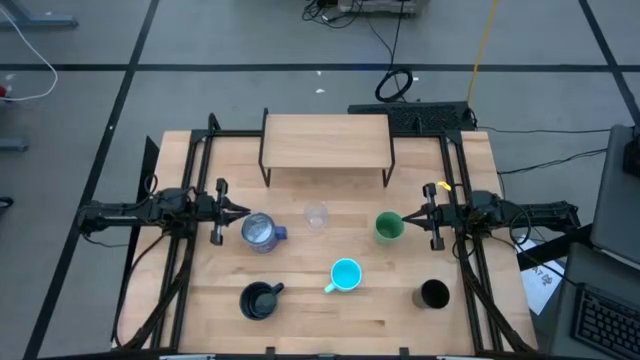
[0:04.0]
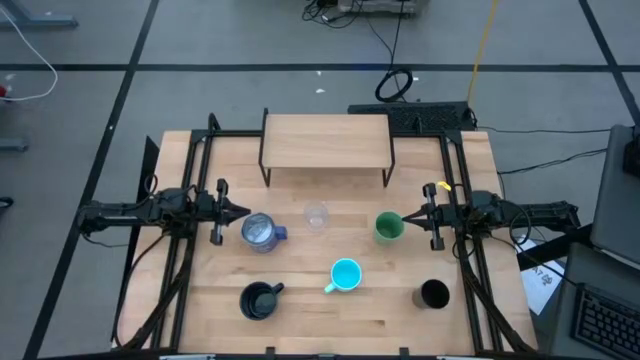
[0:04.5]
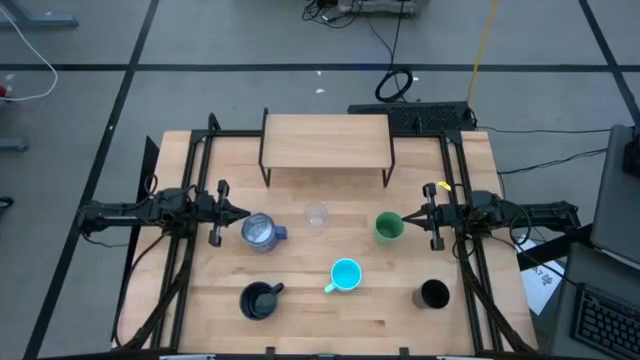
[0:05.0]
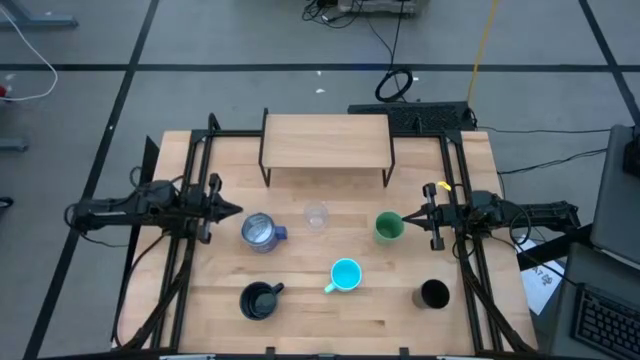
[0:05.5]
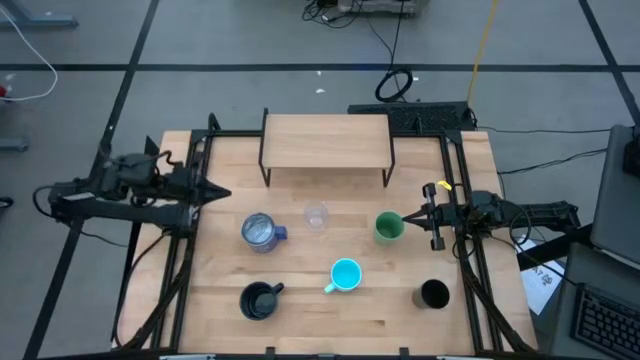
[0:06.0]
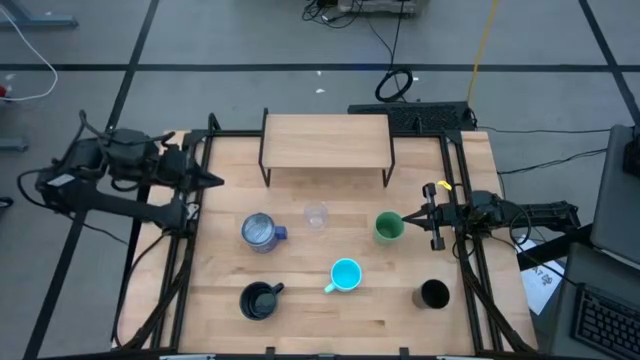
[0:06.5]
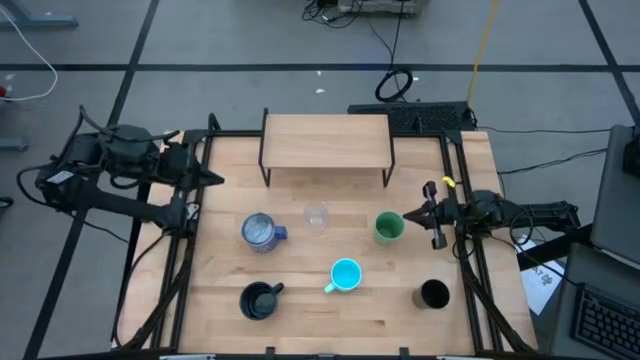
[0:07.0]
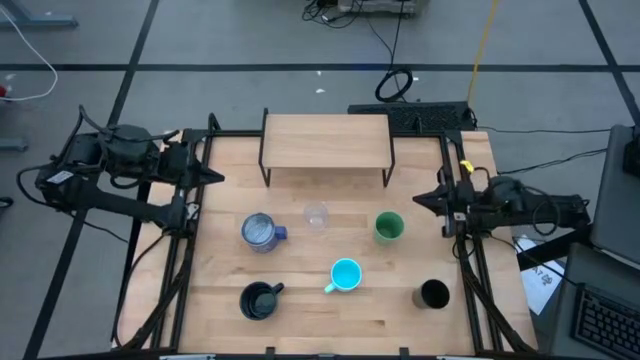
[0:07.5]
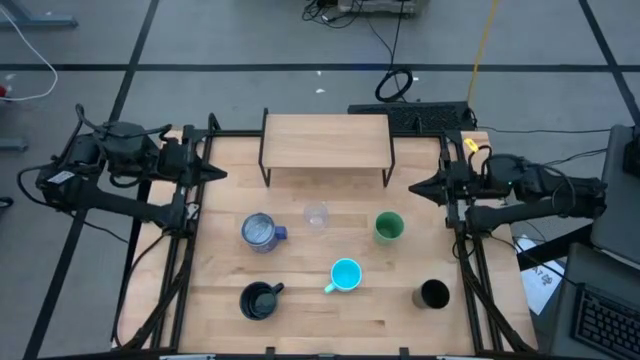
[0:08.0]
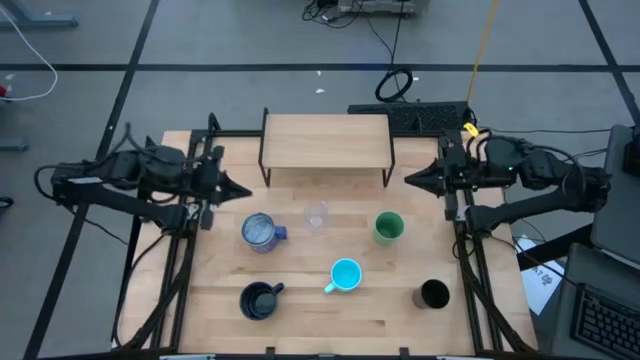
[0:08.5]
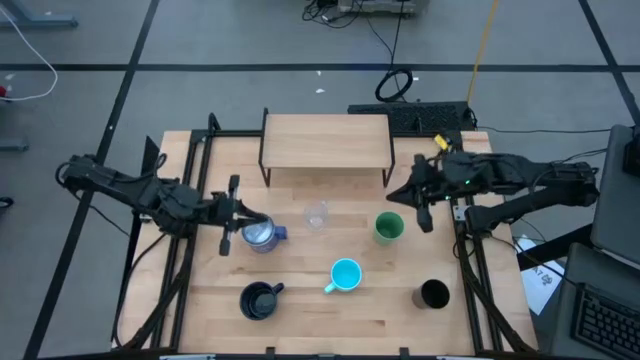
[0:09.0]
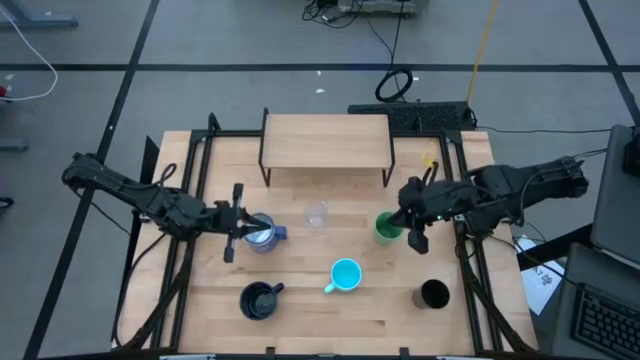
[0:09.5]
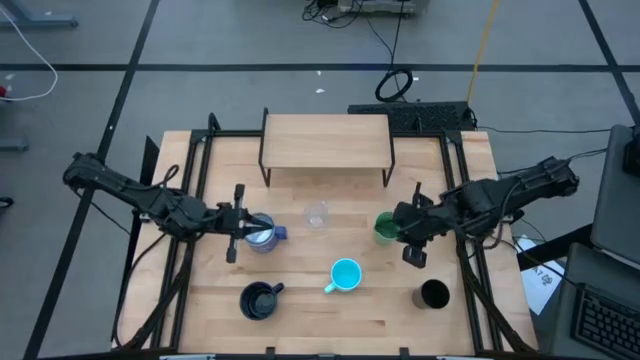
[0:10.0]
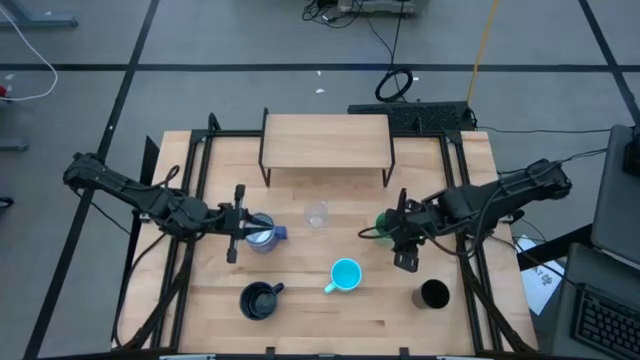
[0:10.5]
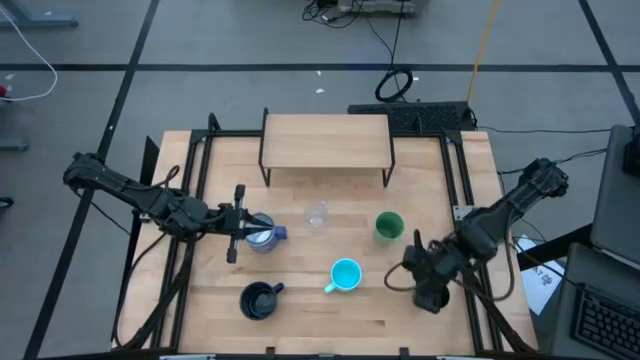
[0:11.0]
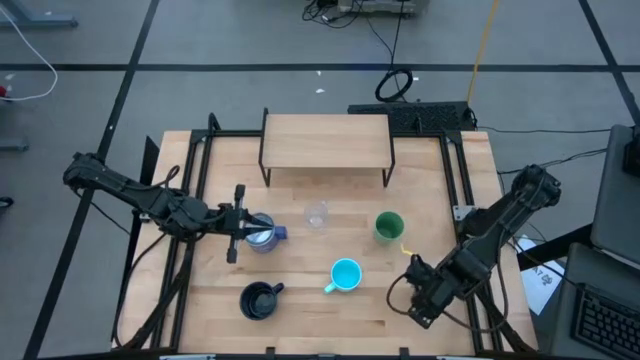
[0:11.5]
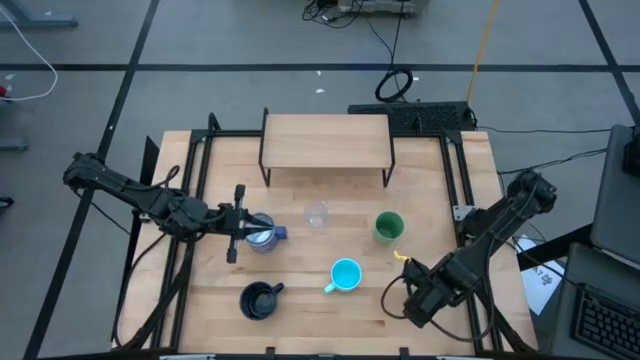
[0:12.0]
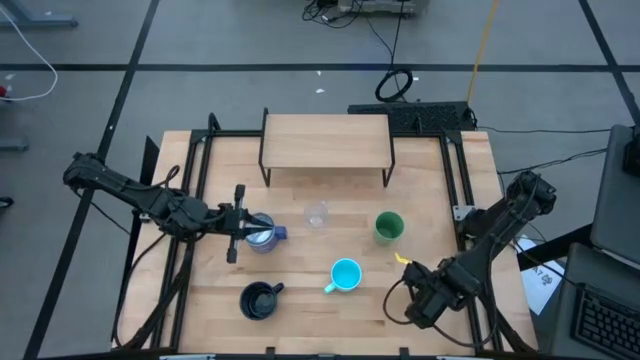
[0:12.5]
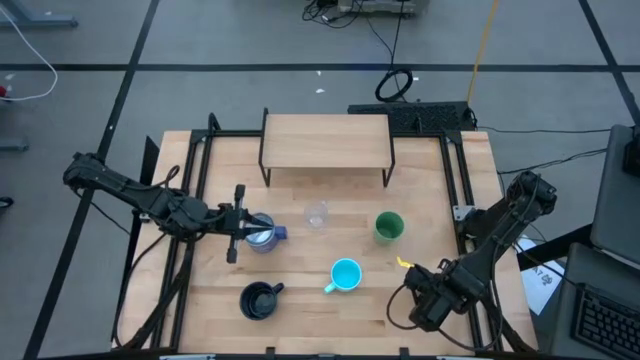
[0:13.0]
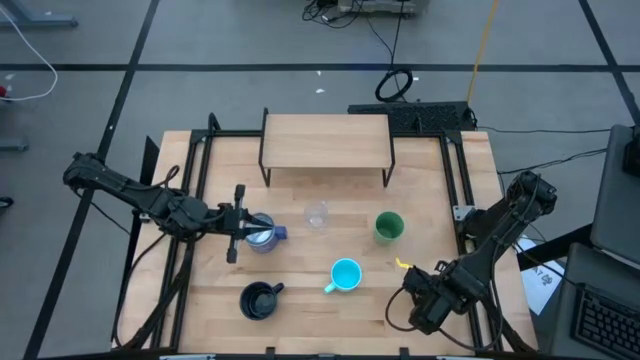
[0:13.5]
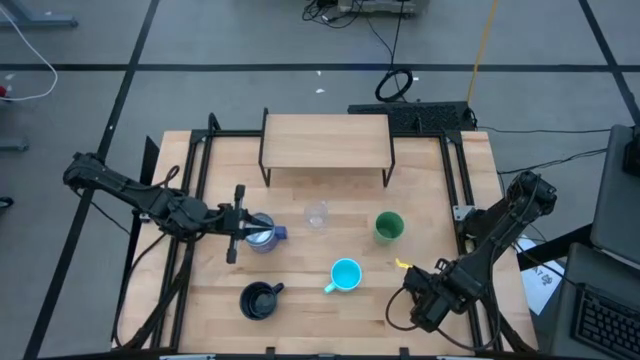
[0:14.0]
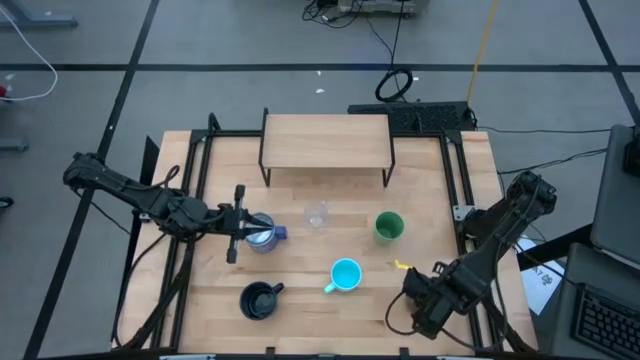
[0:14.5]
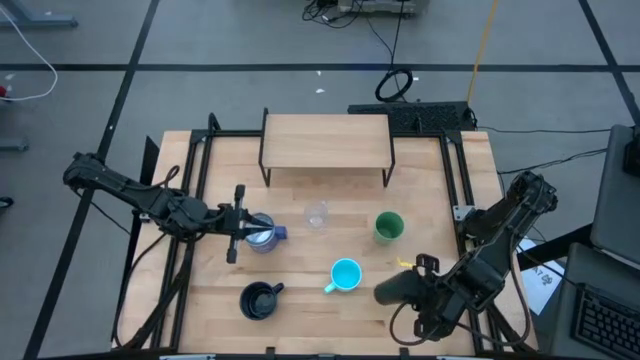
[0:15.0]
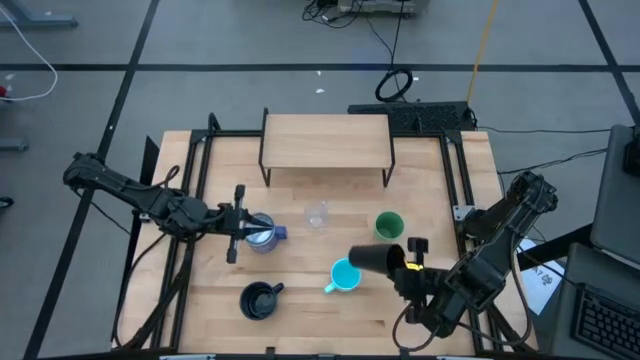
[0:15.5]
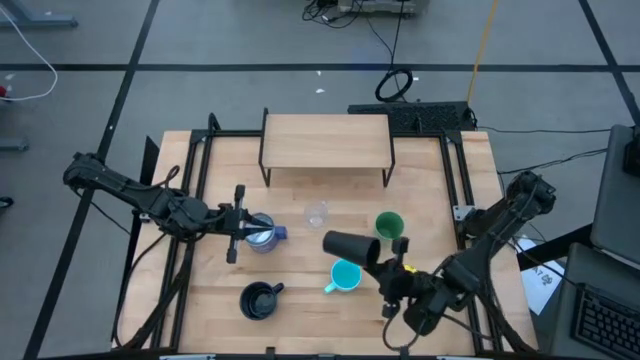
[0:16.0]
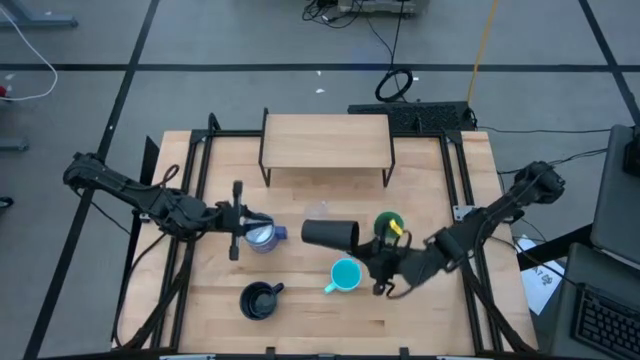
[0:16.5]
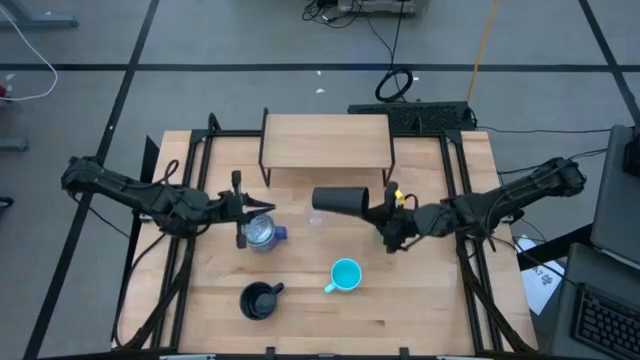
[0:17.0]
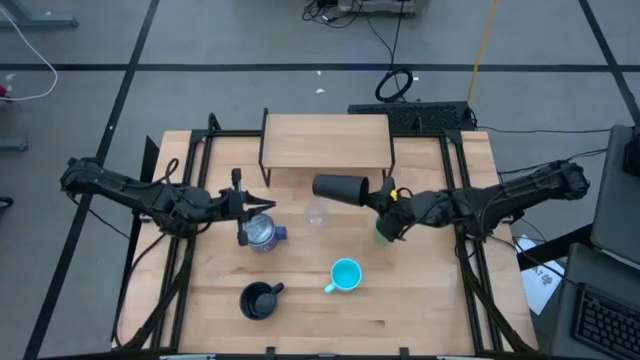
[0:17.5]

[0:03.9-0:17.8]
Task: Stack small to large cups/mugs on shelf
Put the black cup on the shelf

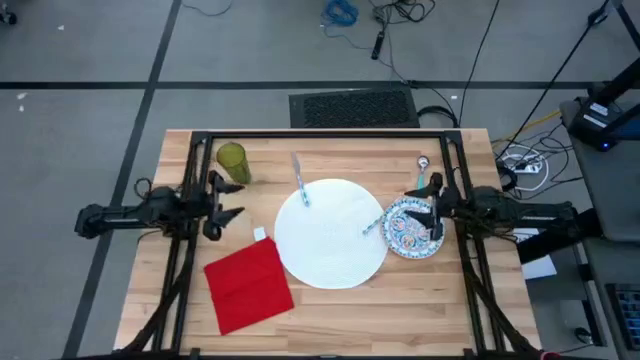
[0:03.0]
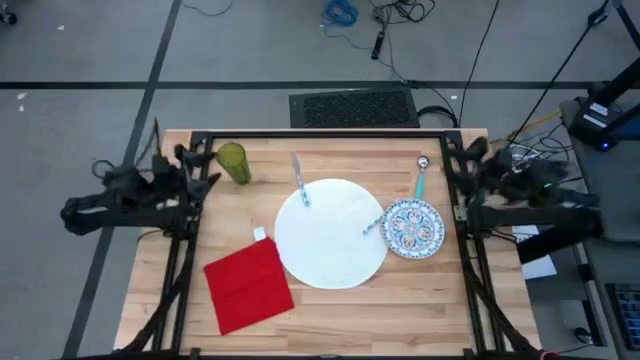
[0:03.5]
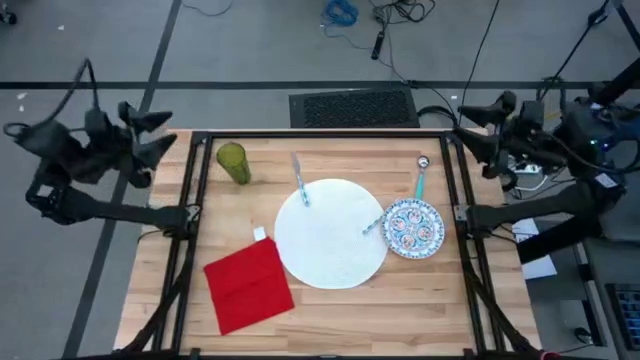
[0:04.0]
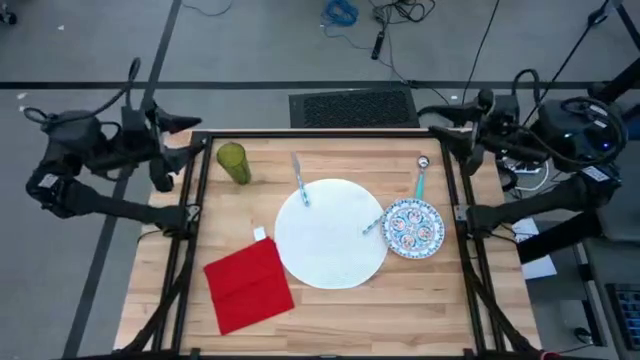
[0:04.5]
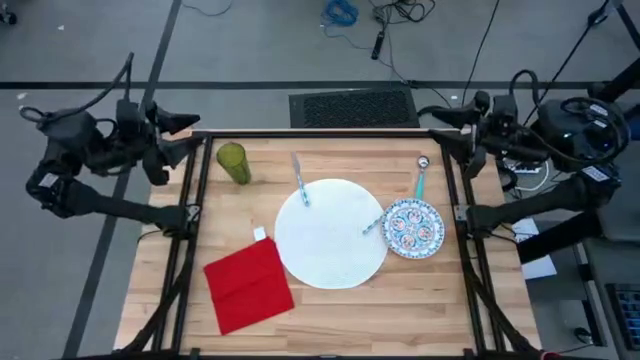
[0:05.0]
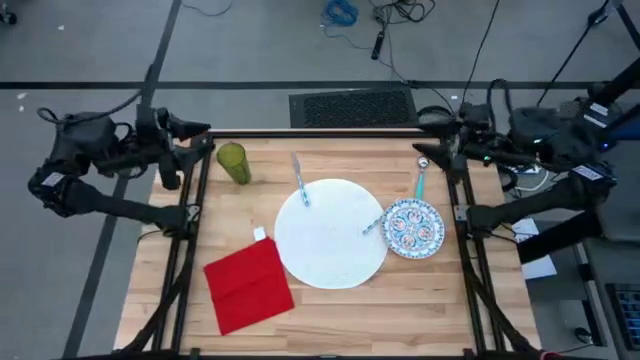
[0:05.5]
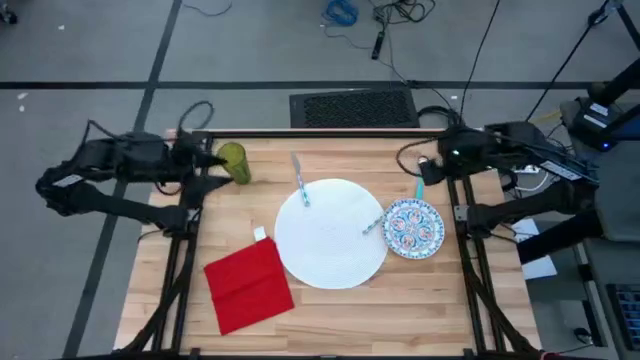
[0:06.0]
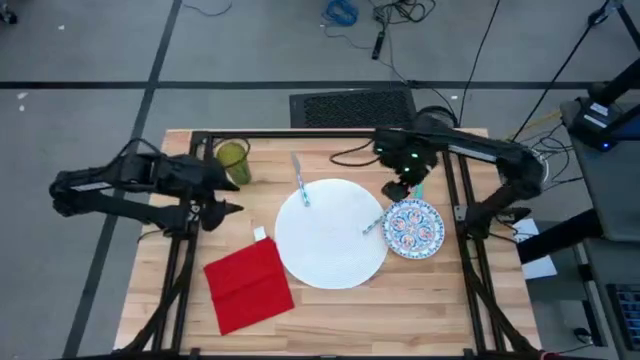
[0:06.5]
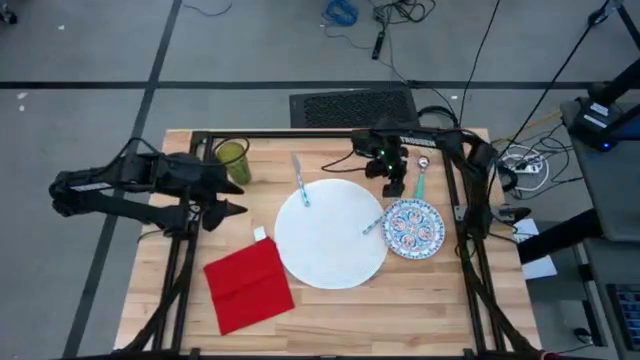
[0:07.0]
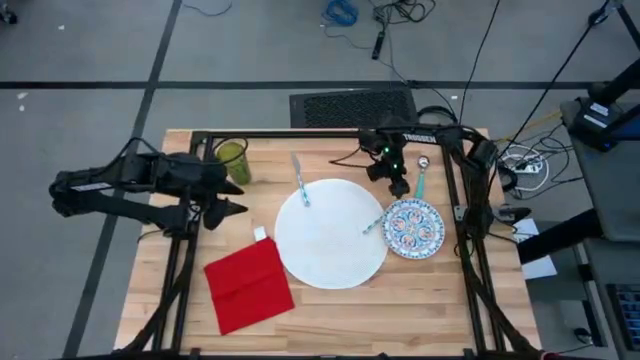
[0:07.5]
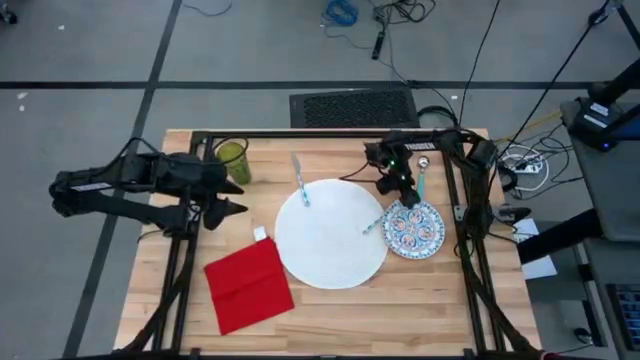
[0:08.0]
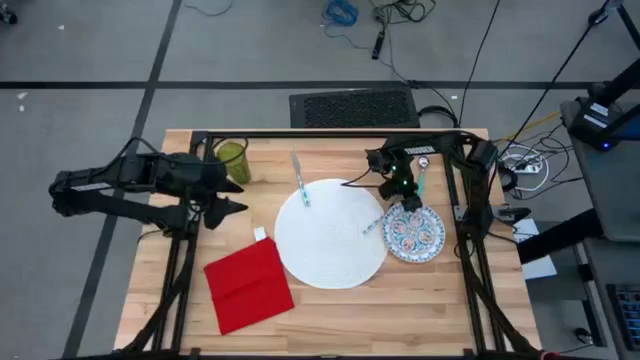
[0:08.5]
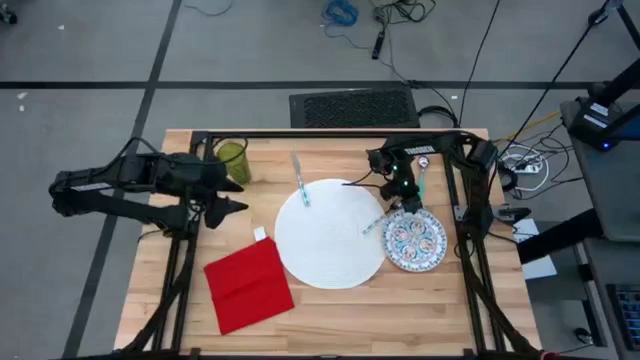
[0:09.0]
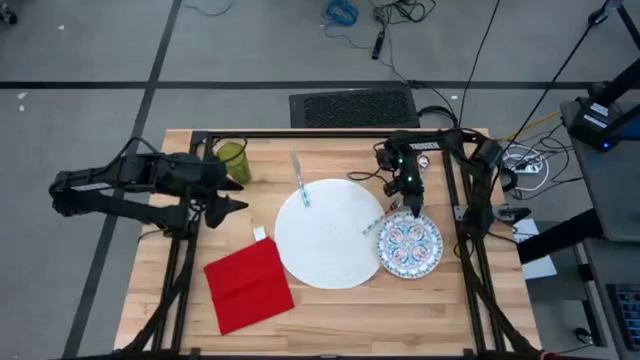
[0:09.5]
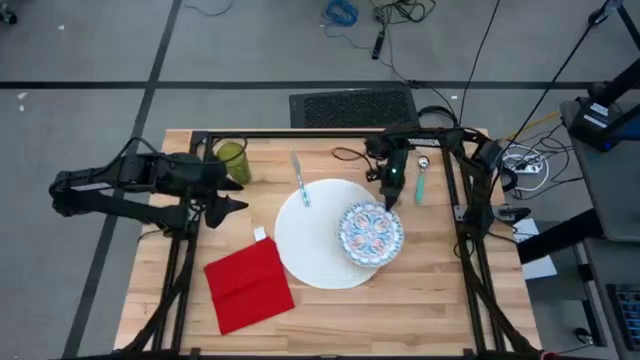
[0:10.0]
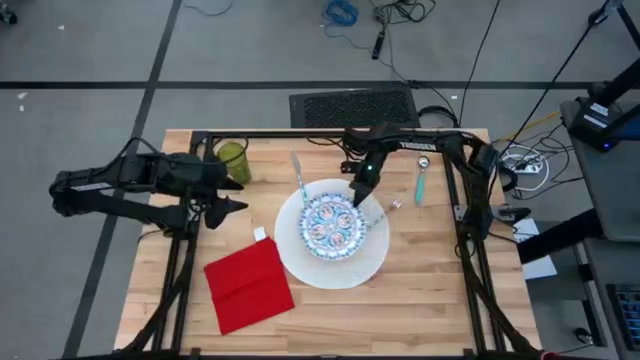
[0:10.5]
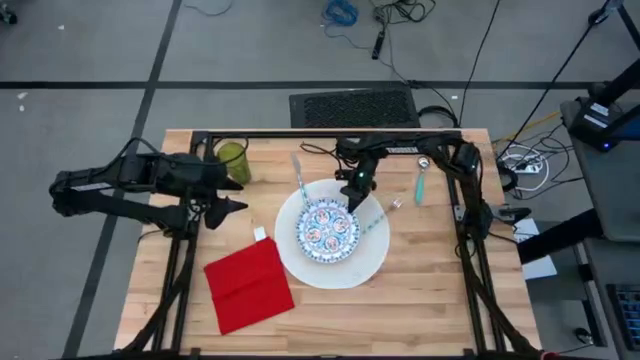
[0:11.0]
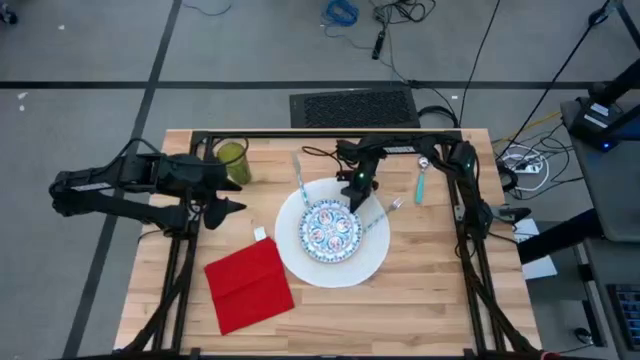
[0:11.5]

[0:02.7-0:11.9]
Task: Set table place
Put the blue patterned plate on white tablemat
